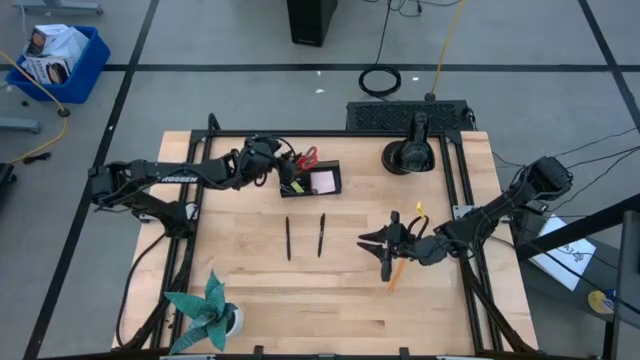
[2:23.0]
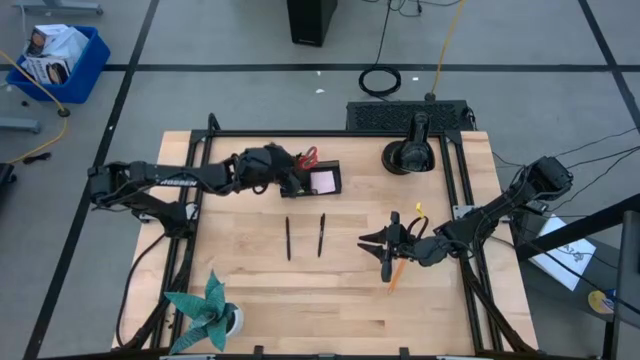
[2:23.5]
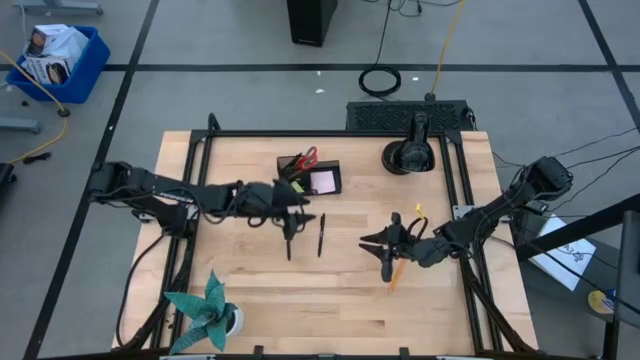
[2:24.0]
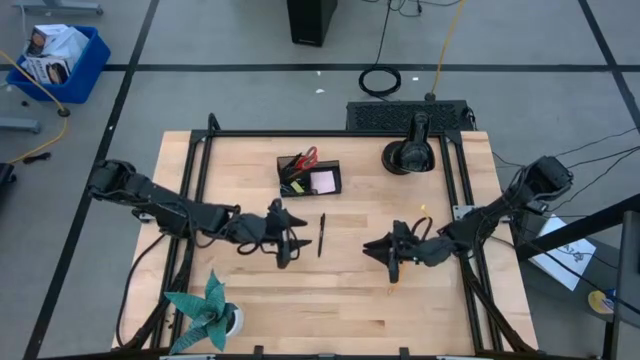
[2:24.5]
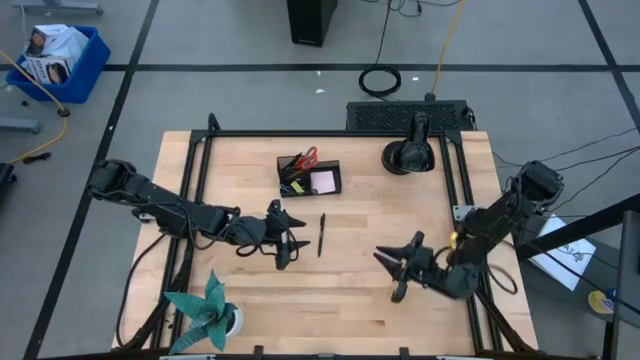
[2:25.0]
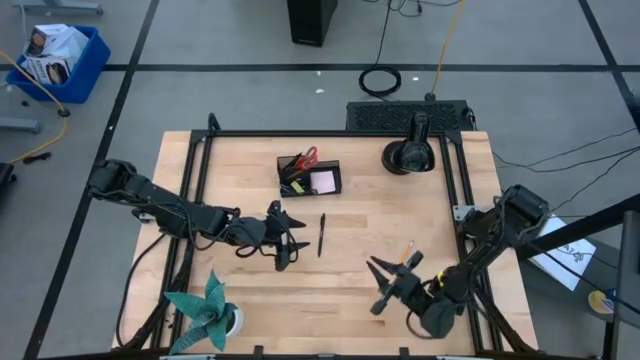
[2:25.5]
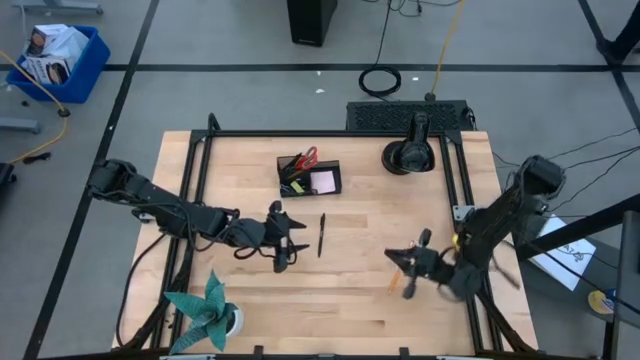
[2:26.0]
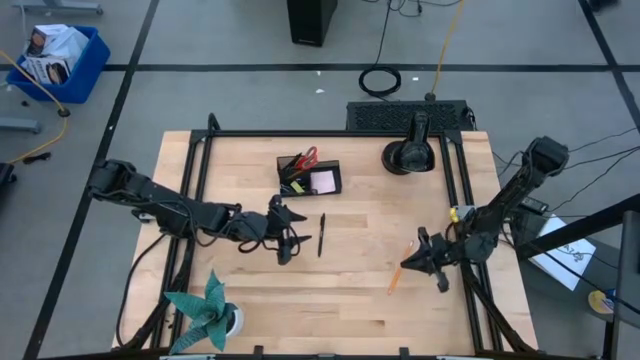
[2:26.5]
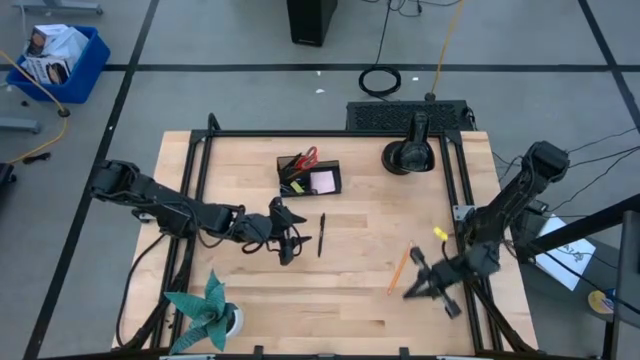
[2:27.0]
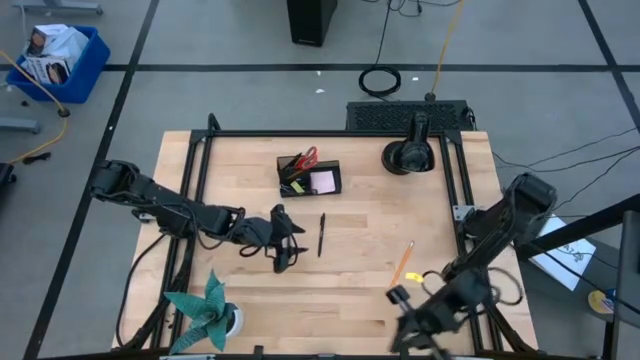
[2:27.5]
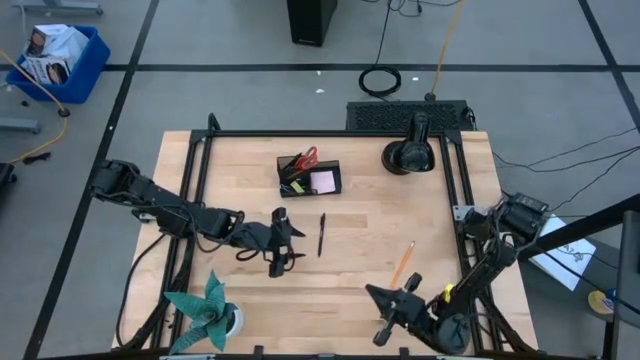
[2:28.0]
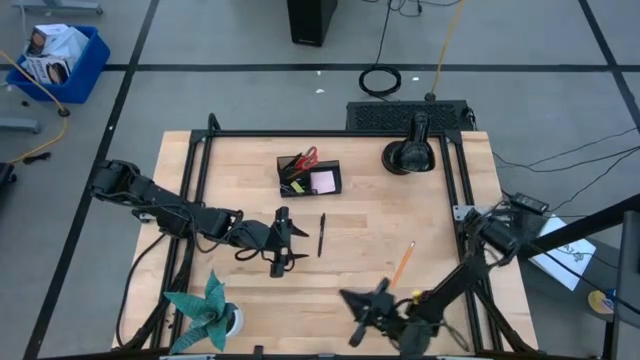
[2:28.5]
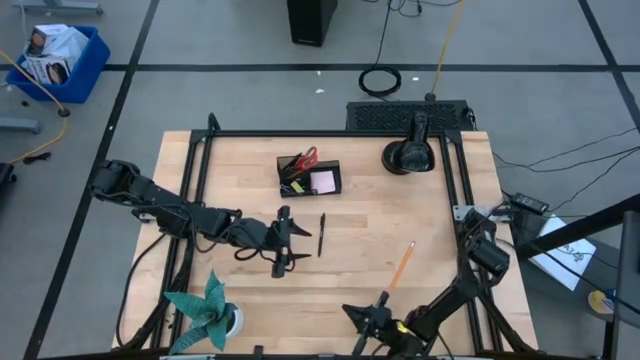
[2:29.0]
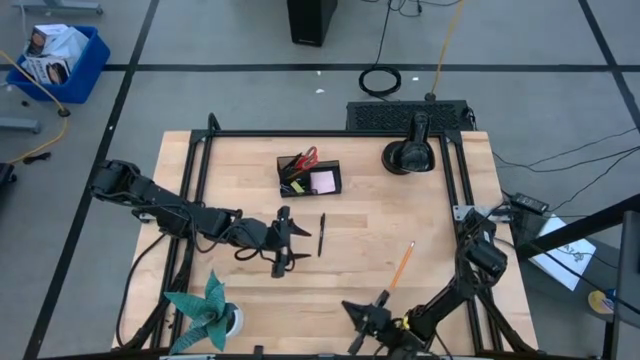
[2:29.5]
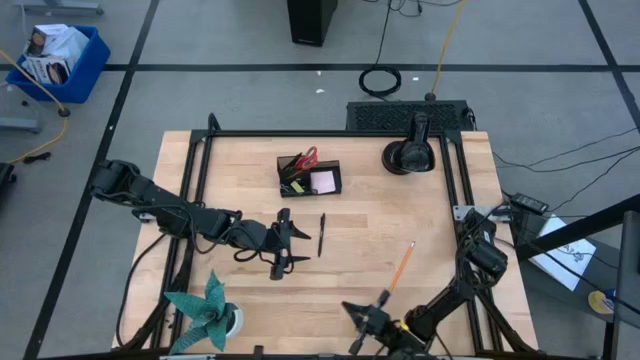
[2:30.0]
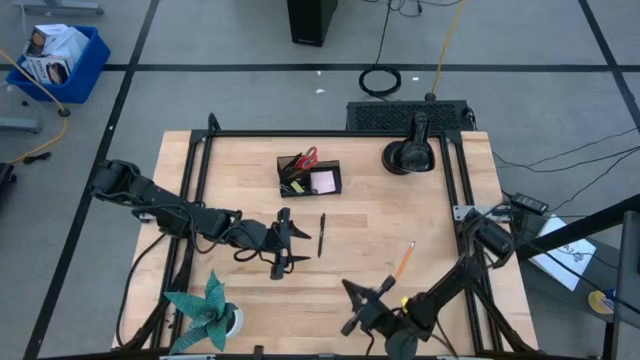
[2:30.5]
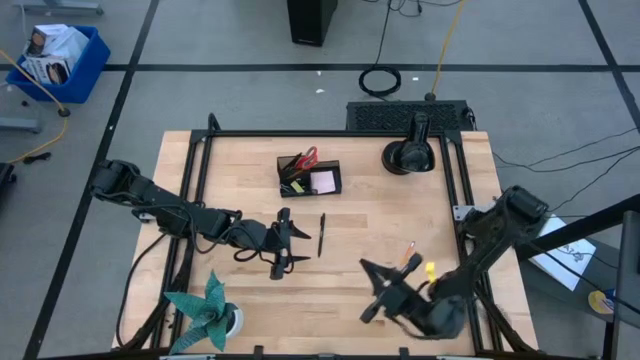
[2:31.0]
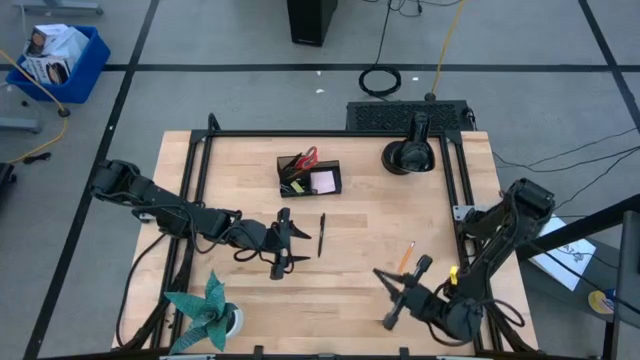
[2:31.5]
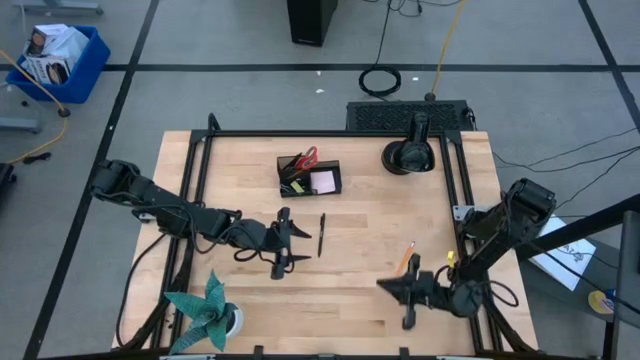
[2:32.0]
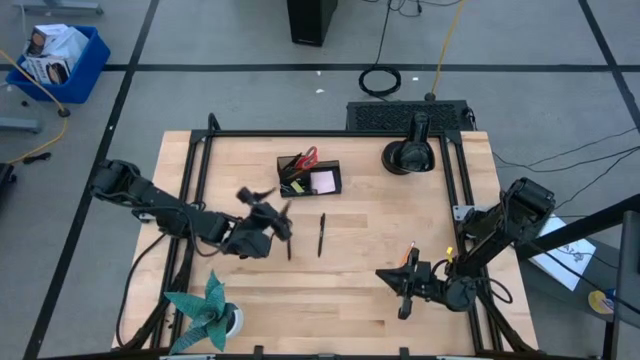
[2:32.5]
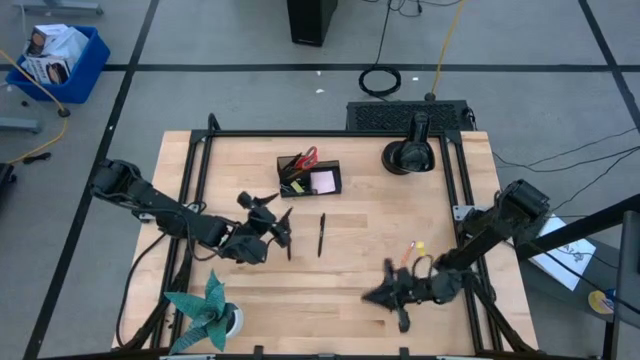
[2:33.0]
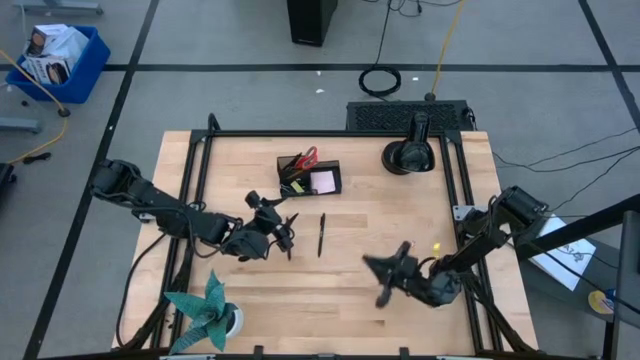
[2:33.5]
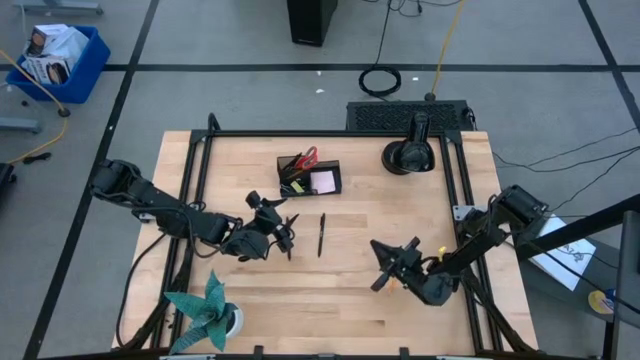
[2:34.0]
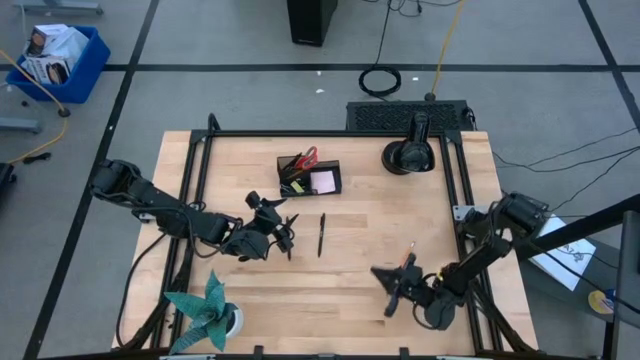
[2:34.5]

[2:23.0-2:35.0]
Task: Pick and place office supplies into organizer
Put the orange pencil into the black desk organizer

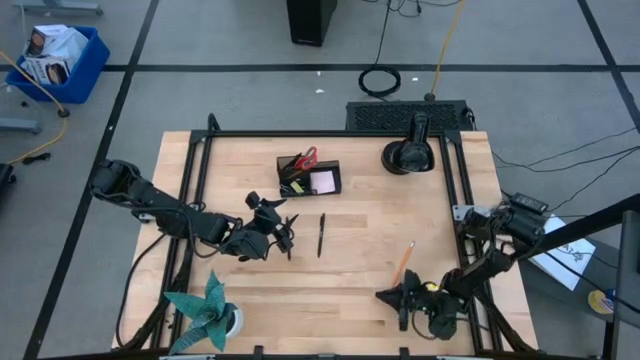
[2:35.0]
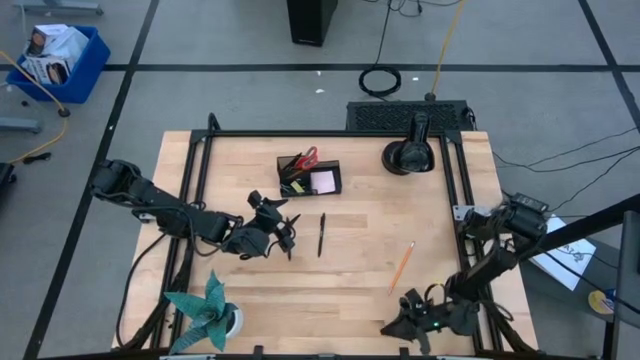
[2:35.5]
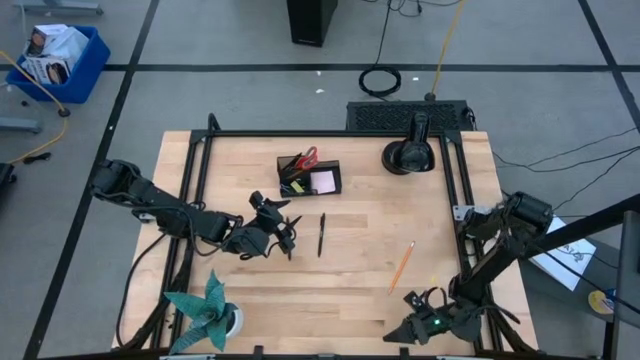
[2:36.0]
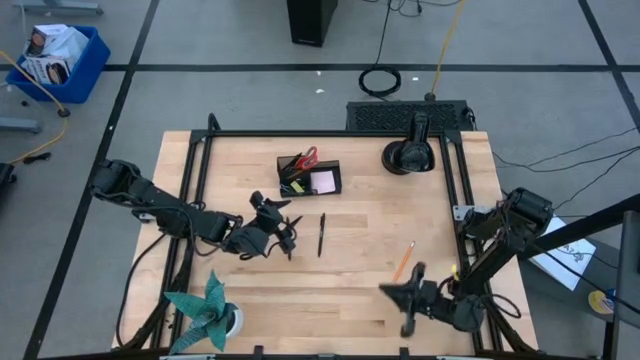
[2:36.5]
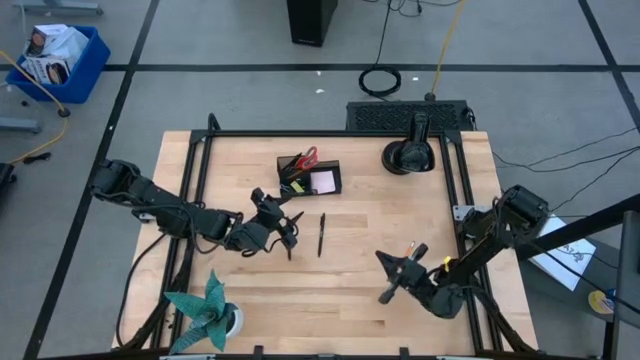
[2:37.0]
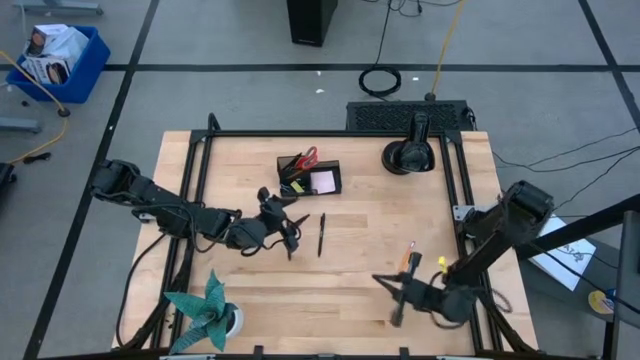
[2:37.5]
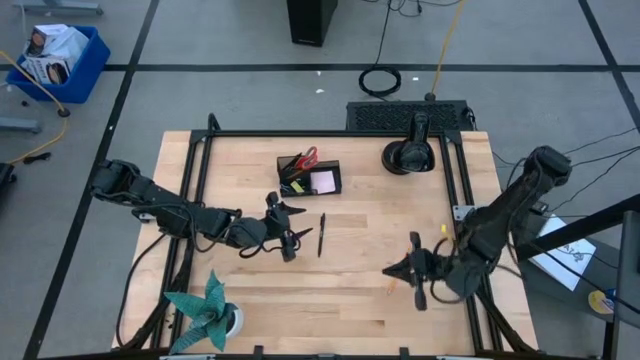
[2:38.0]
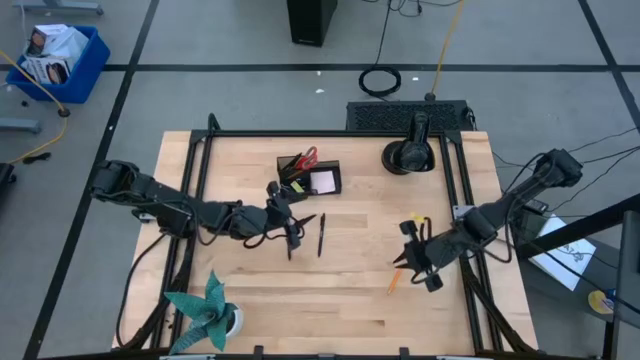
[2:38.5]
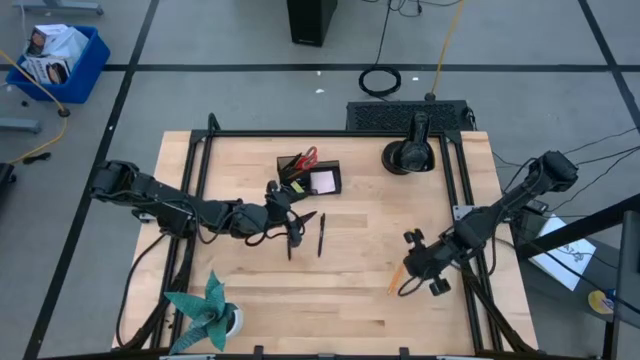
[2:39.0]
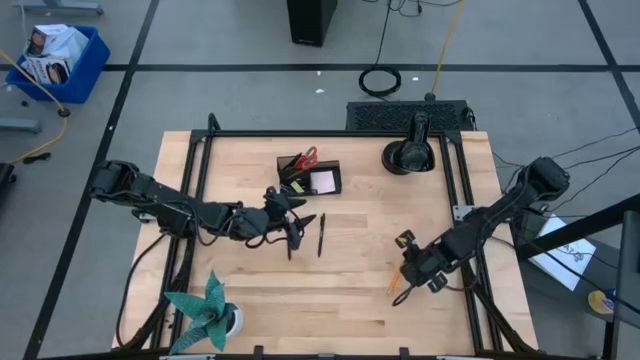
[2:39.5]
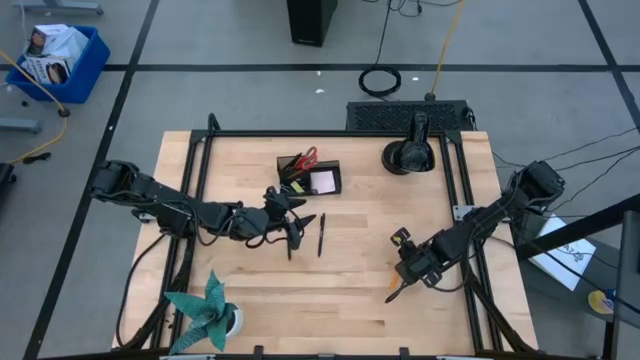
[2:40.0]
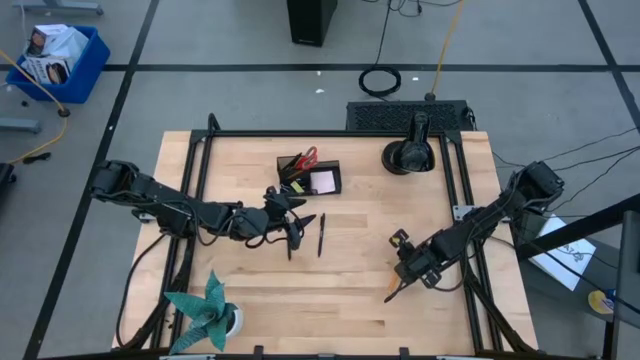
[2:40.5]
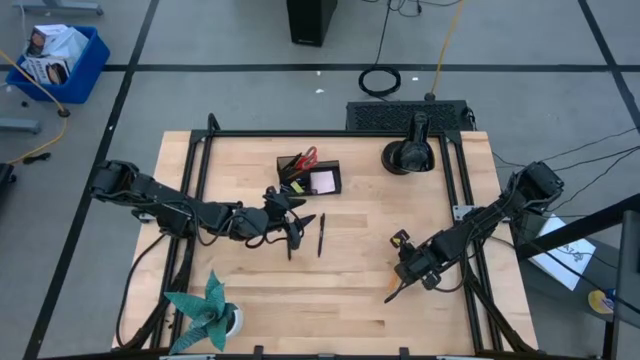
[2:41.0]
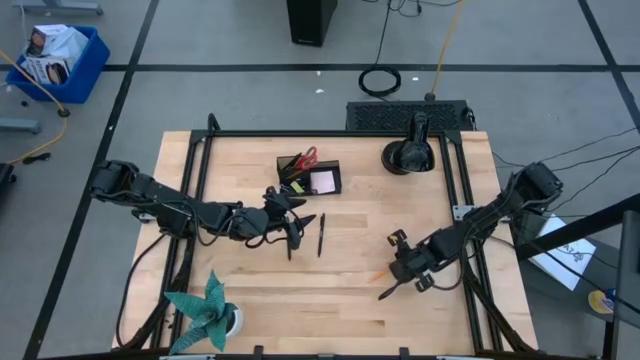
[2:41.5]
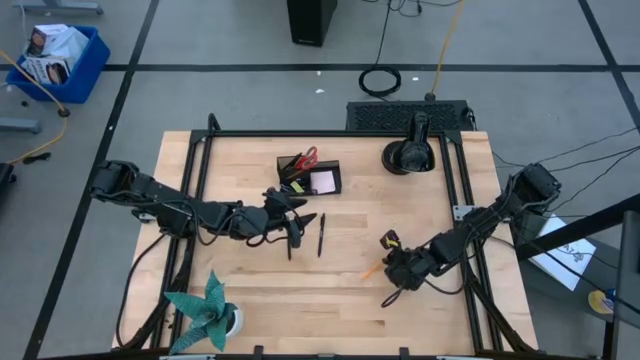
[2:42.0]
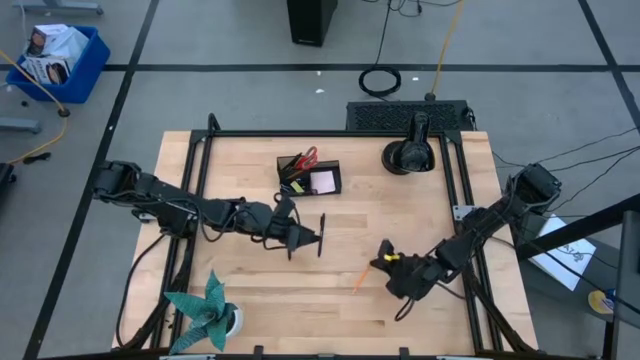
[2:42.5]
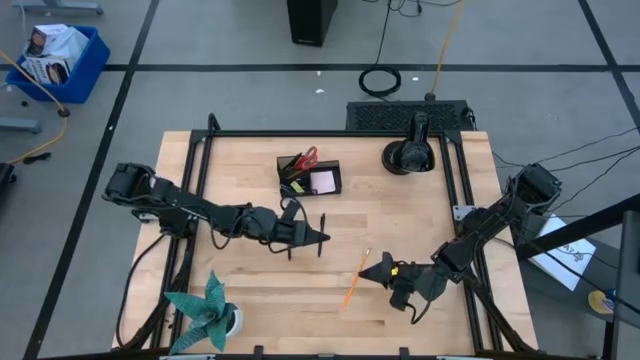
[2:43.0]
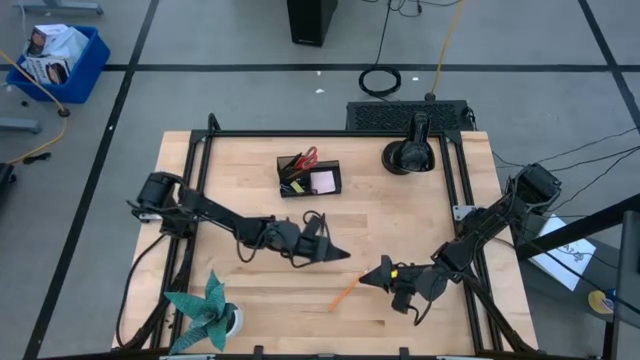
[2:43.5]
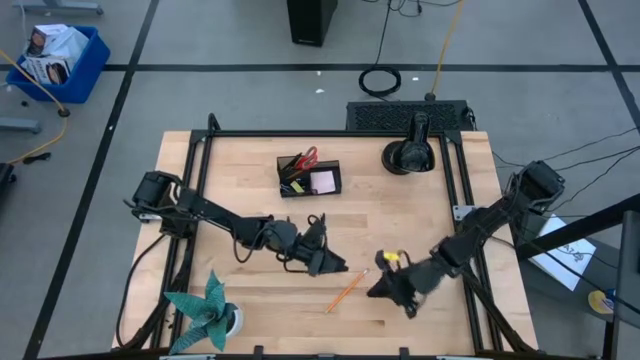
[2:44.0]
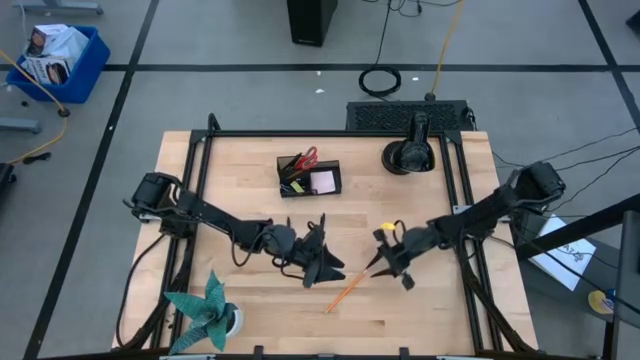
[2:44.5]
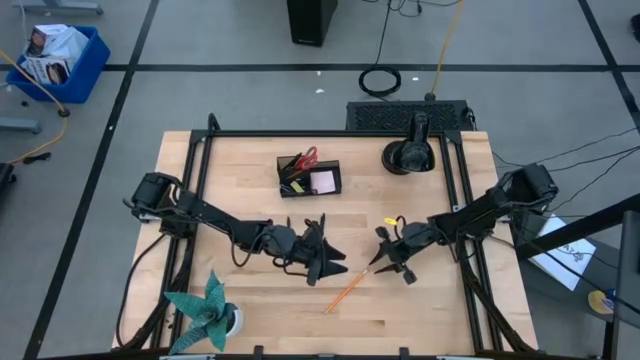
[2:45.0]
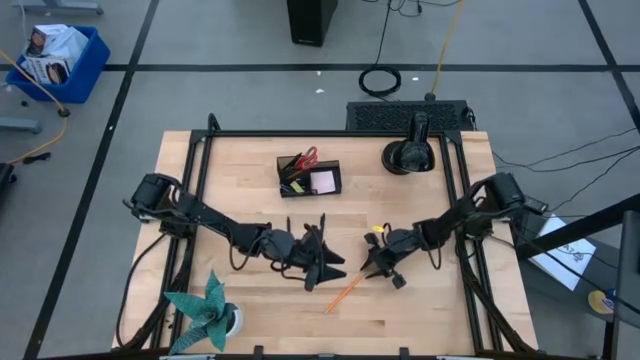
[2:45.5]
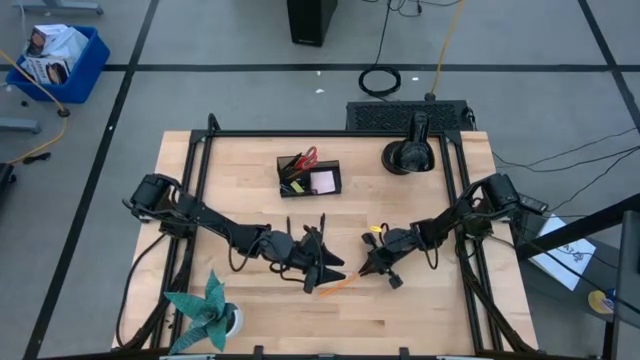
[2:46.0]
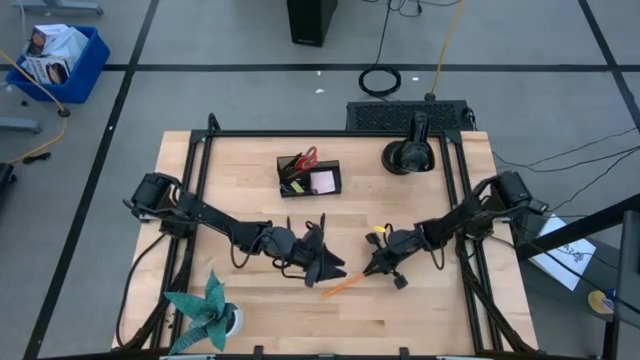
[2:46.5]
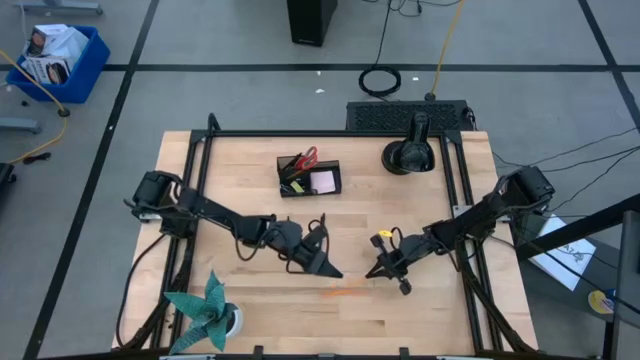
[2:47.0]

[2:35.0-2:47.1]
Put the orange pencil into the black desk organizer
